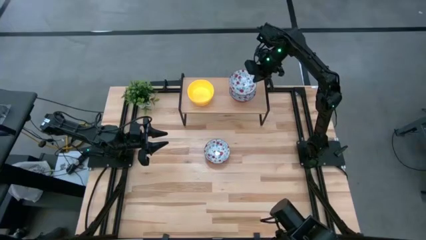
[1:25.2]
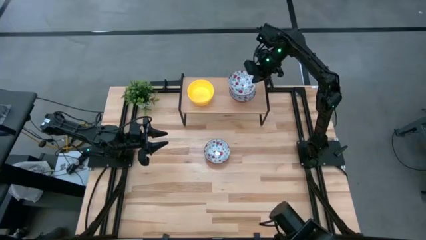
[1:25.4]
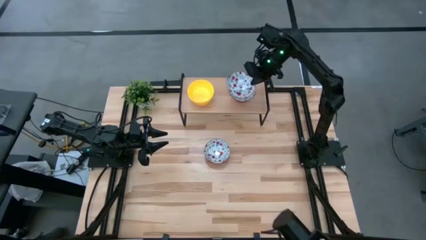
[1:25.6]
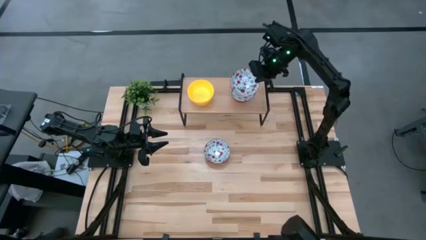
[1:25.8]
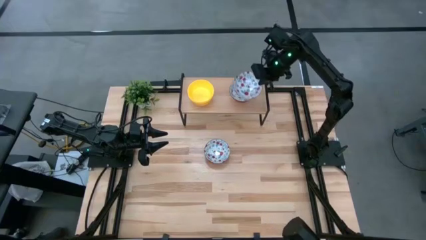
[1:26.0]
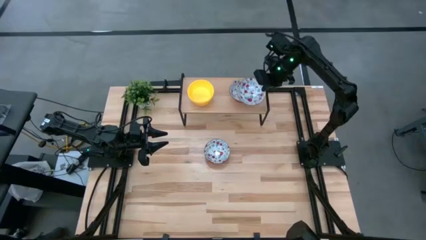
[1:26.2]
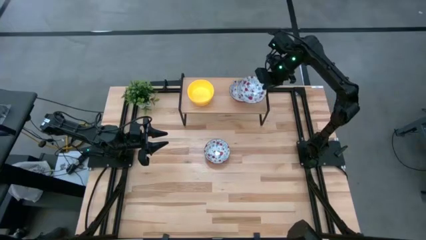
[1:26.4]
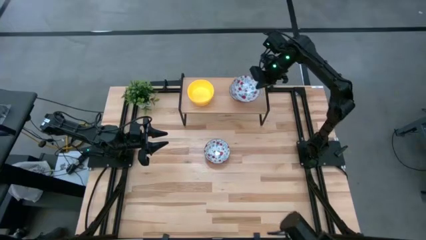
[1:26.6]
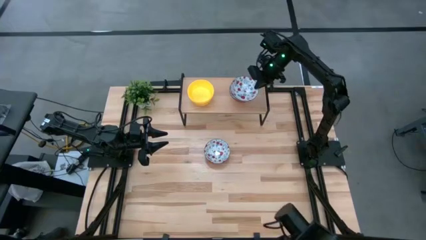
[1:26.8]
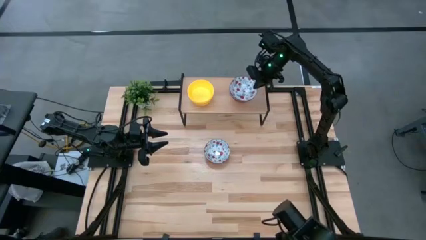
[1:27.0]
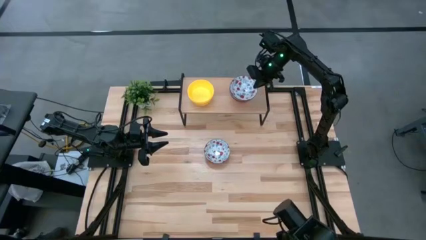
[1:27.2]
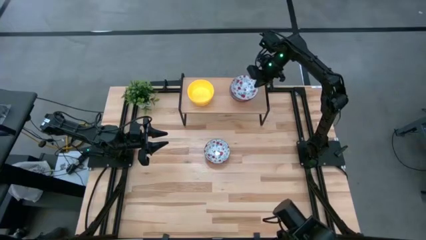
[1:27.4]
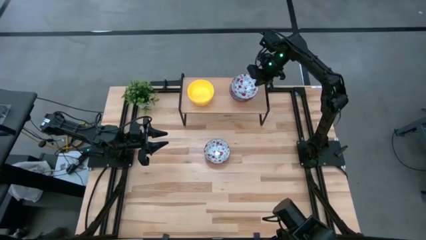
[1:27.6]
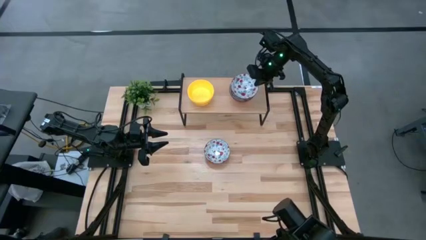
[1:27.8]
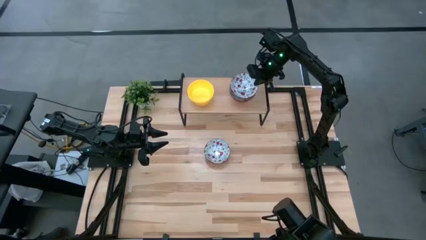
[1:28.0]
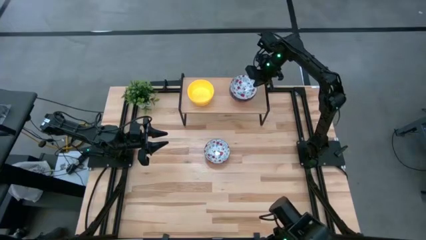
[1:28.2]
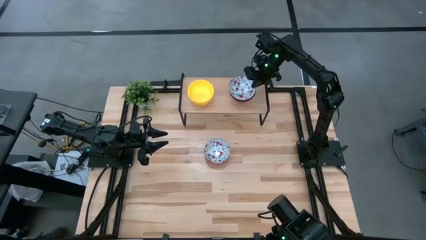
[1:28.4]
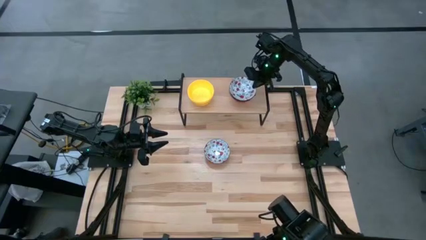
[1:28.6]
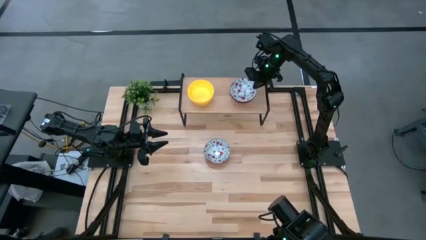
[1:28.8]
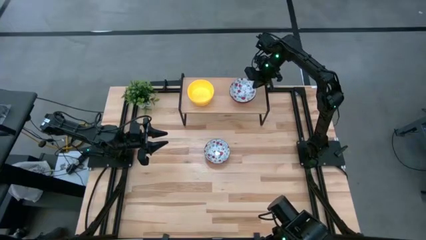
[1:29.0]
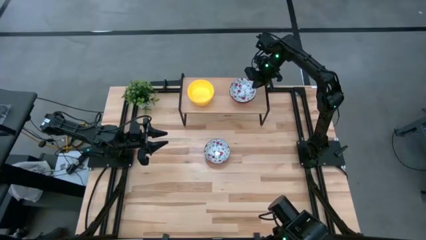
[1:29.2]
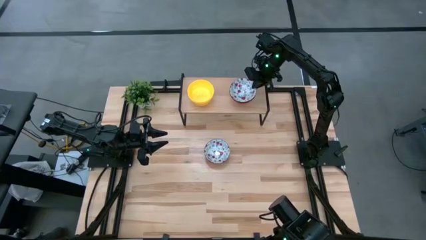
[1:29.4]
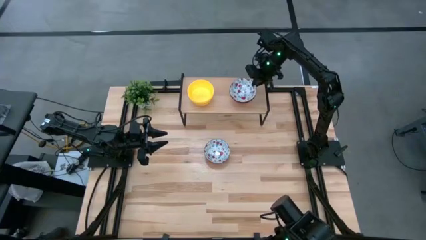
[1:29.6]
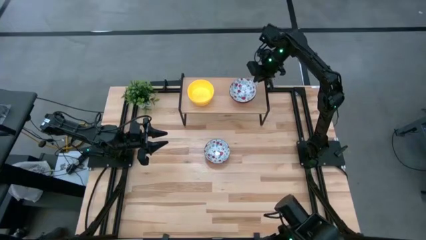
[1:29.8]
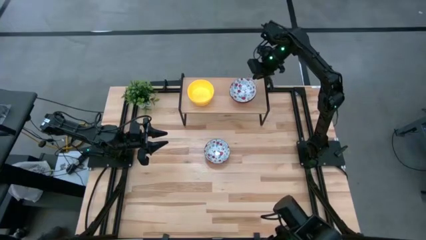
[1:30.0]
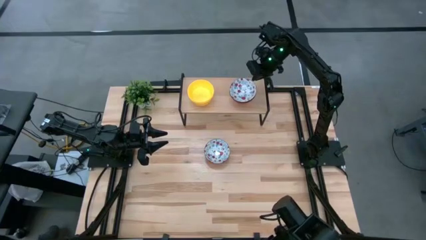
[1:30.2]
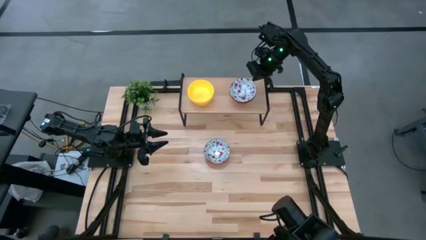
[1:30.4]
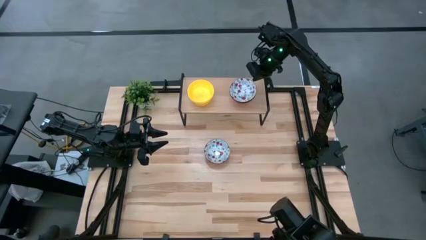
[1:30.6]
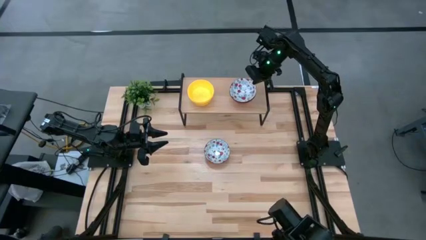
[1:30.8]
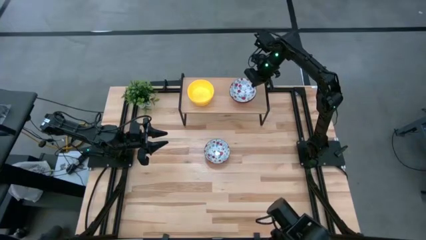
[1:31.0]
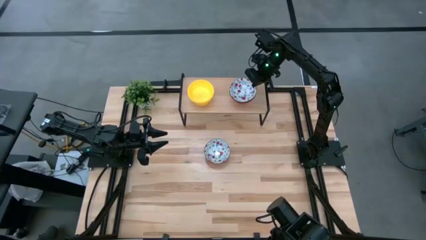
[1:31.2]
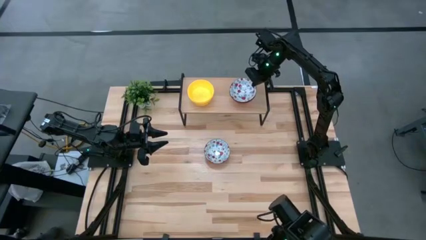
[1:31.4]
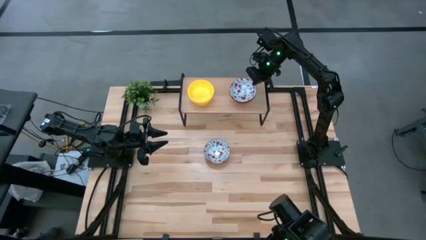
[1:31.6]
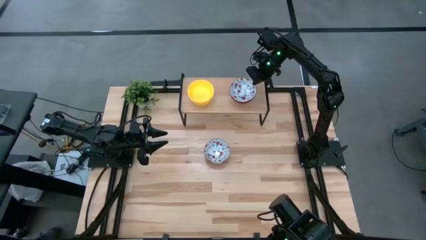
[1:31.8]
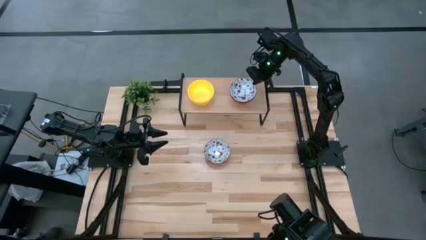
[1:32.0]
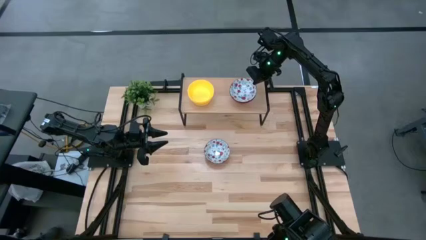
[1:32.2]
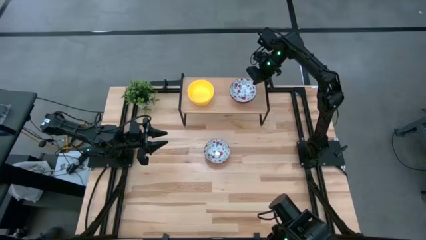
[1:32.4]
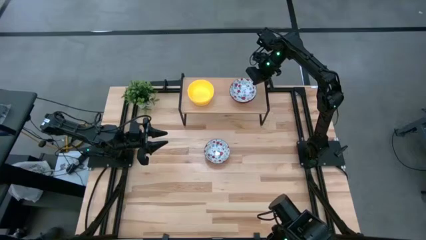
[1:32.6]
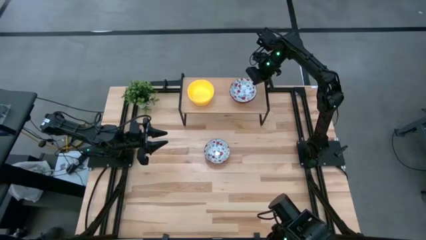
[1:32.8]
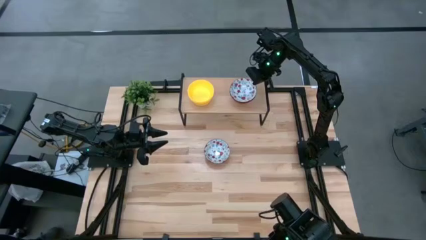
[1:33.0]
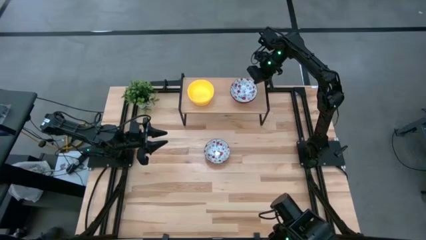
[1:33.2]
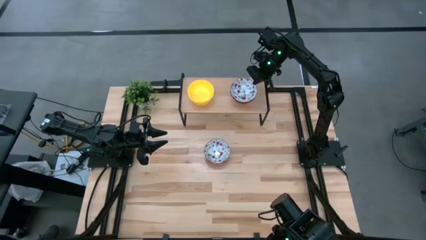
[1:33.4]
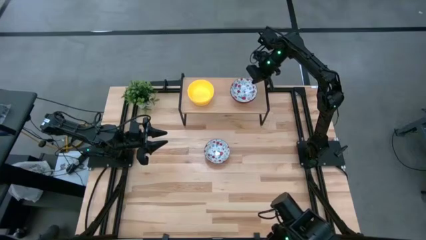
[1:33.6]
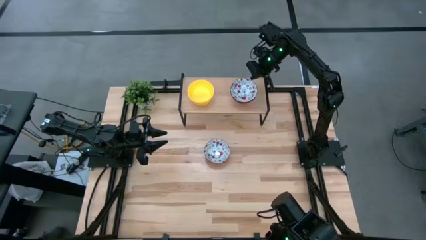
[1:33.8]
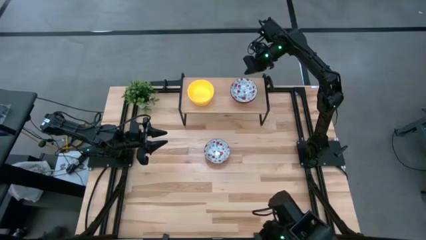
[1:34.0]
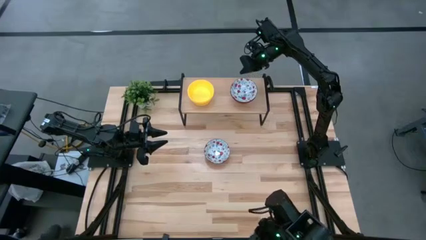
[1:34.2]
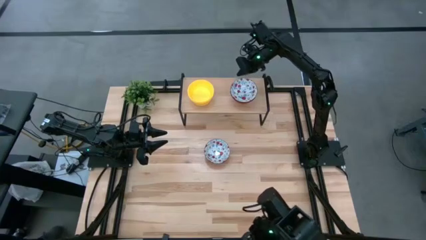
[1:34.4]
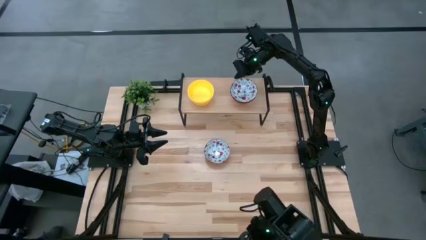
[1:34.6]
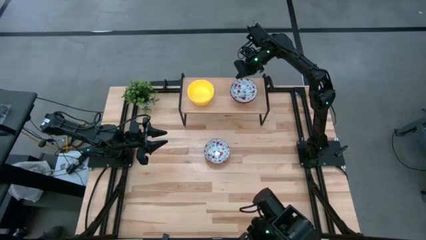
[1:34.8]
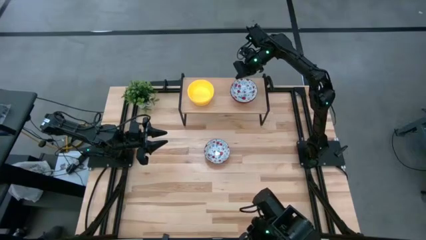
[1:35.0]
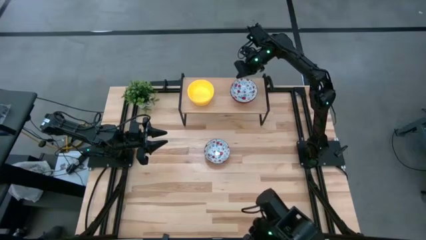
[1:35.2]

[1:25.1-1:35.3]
Task: Pick & Place Mini bowls
Stack the right white bowl on top of the white bowl on the shelf
